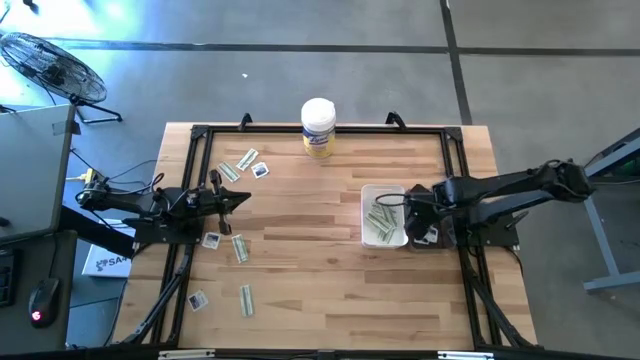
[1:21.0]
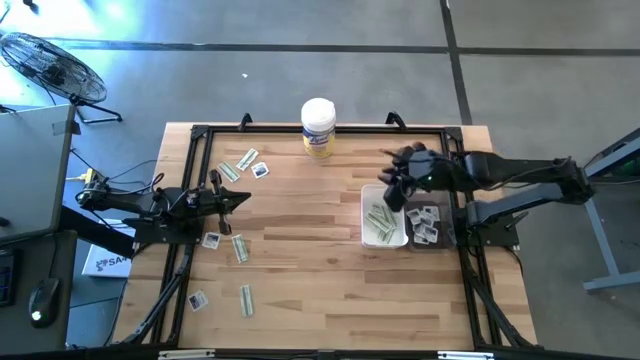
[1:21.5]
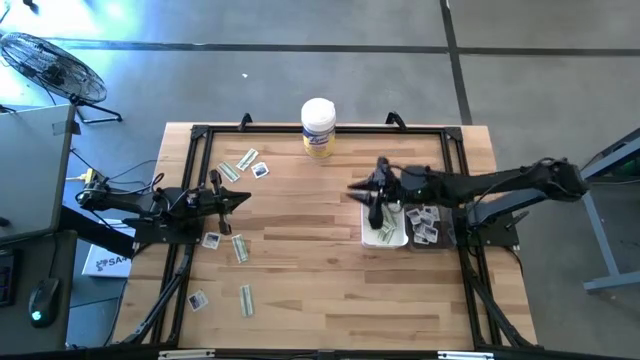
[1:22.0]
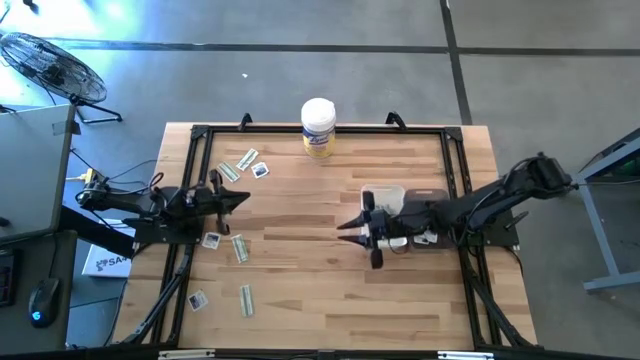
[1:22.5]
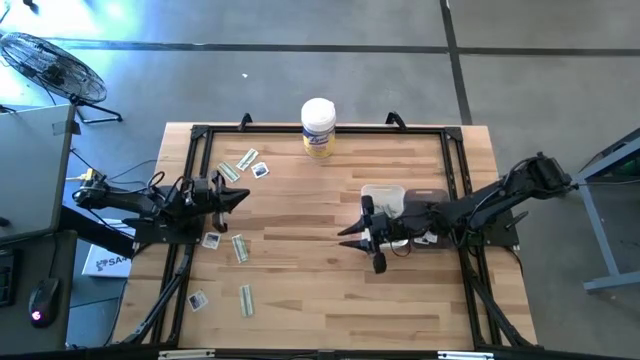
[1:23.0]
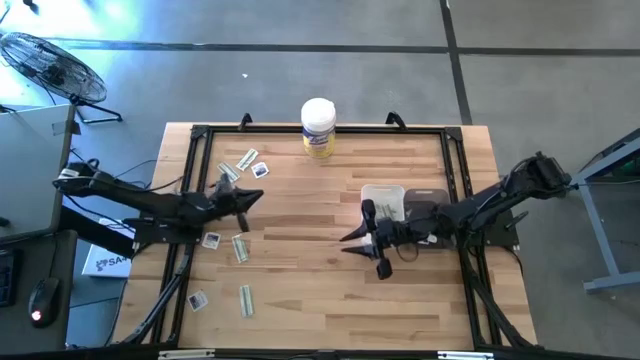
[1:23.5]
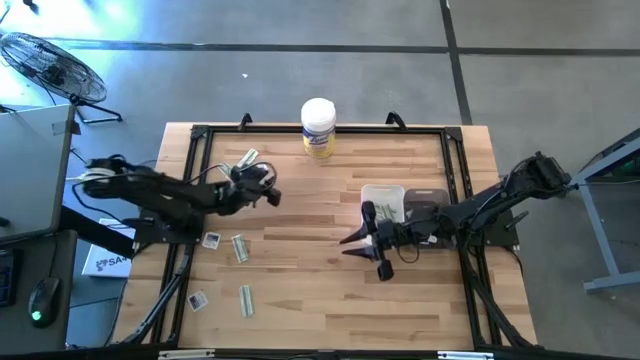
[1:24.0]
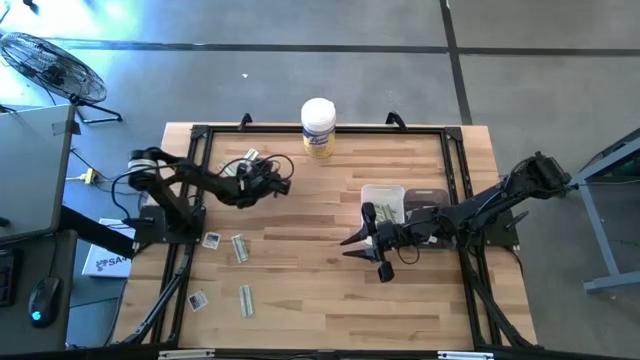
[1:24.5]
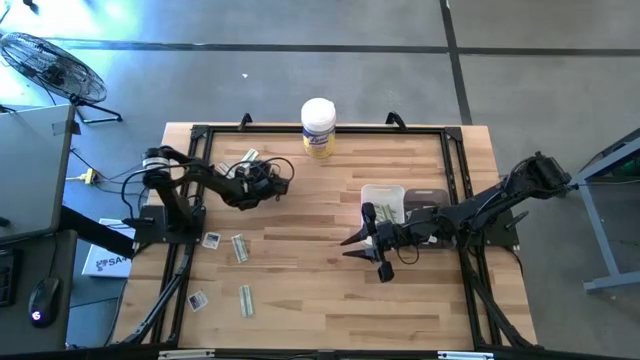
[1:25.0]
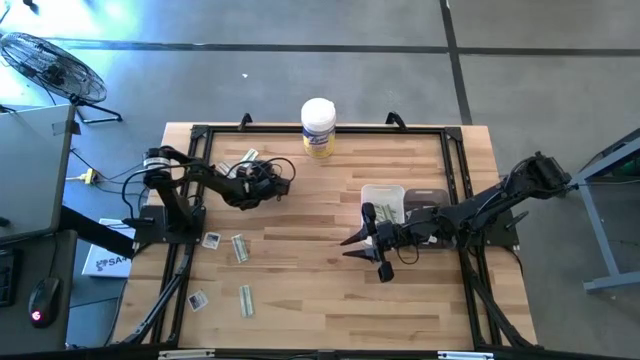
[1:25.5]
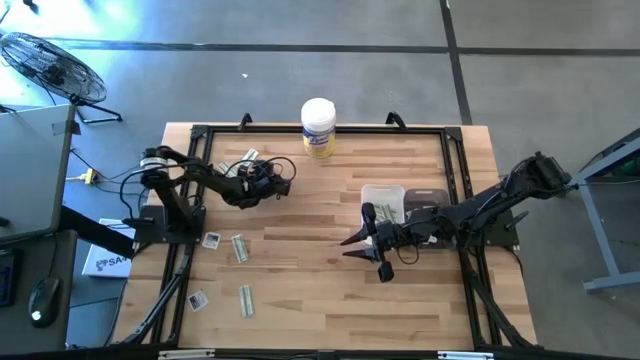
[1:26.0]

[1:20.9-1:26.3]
Task: Pick & Place First Aid Supplies
Put the blue alcohol pad into the black bin

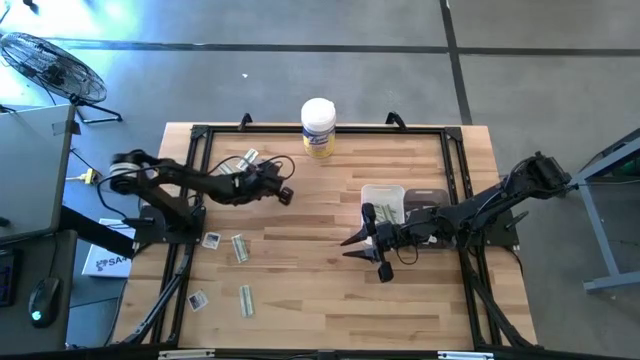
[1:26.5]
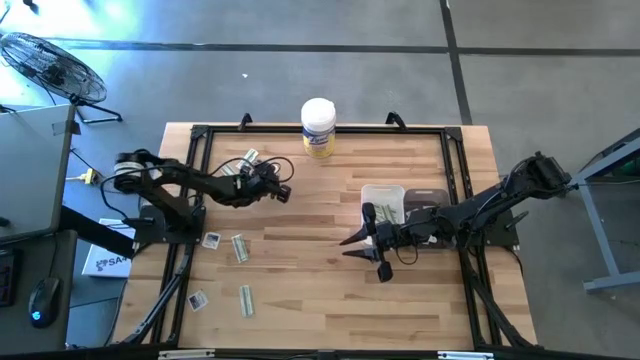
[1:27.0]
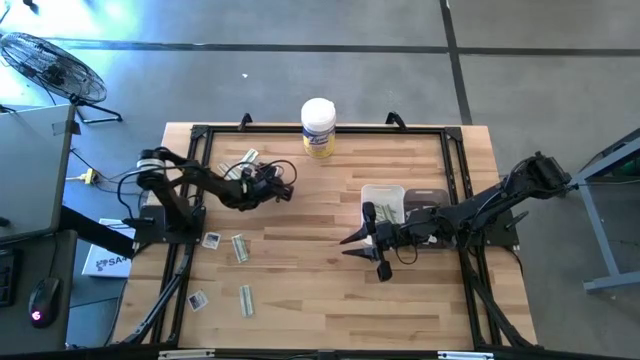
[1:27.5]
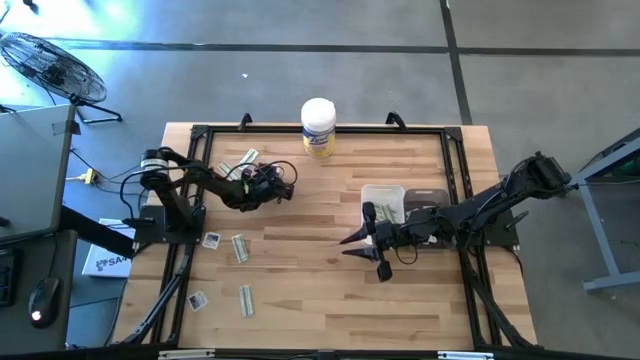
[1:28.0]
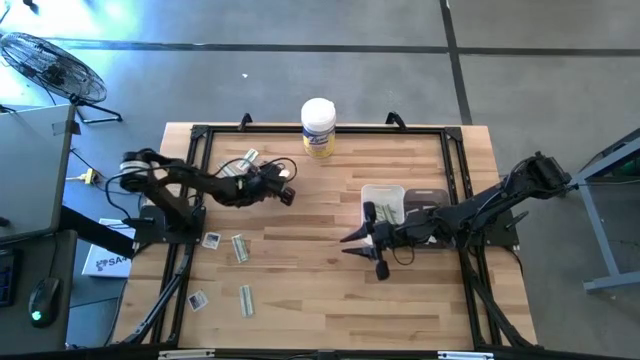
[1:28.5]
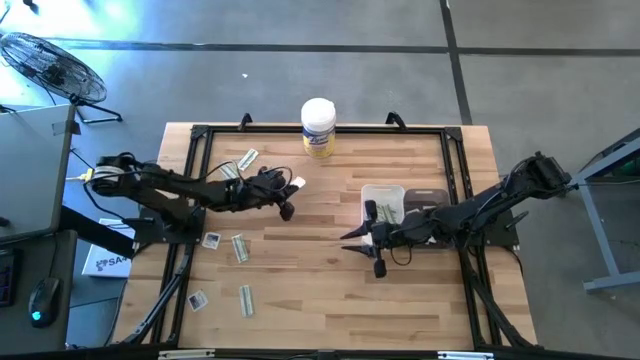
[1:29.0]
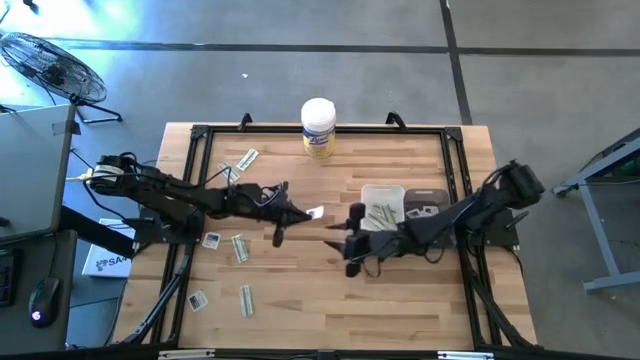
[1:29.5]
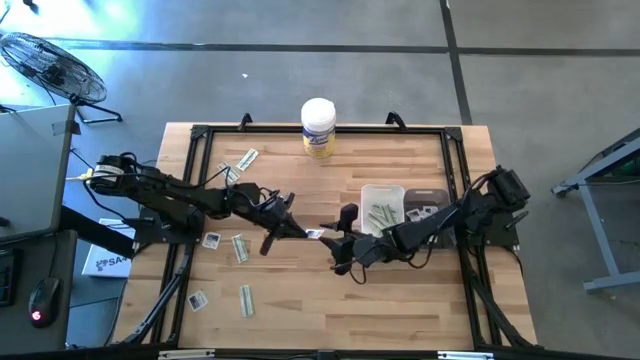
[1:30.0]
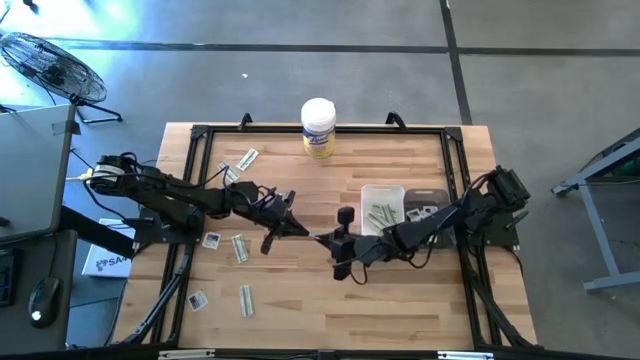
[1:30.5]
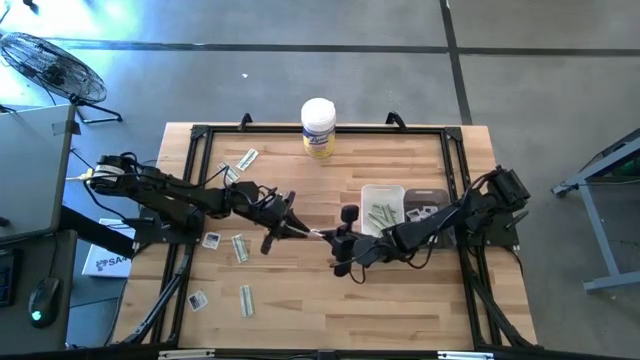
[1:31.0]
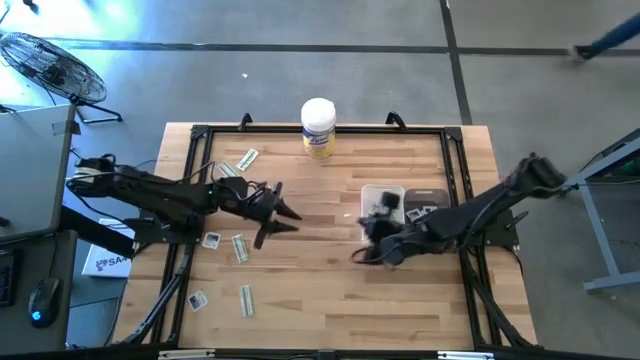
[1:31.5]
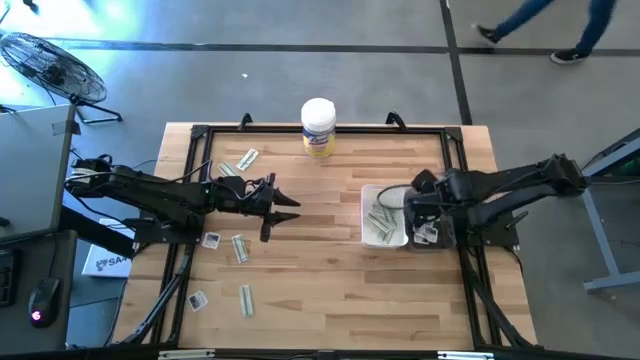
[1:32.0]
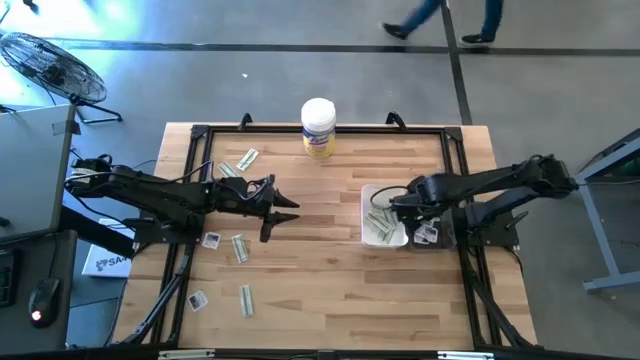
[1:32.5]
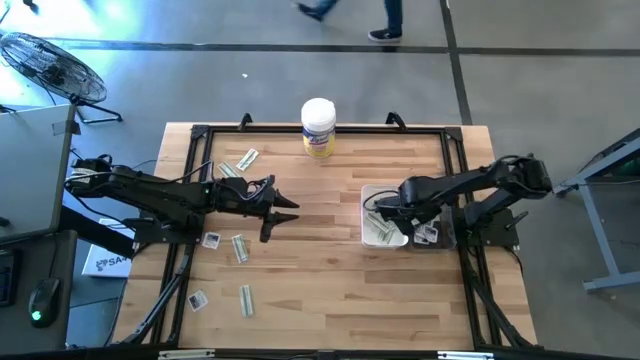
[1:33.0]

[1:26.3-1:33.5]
Put the blue alcohol pad into the black bin

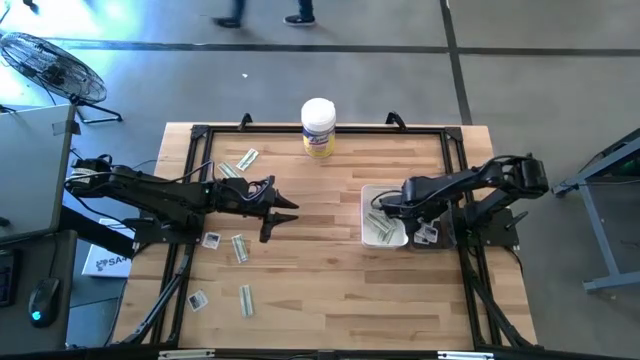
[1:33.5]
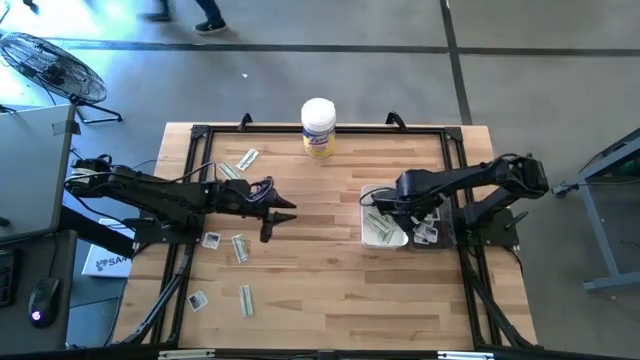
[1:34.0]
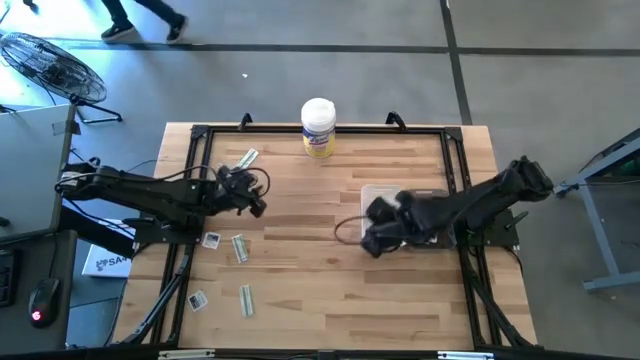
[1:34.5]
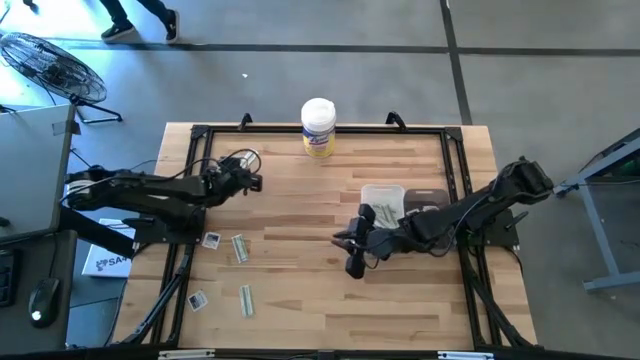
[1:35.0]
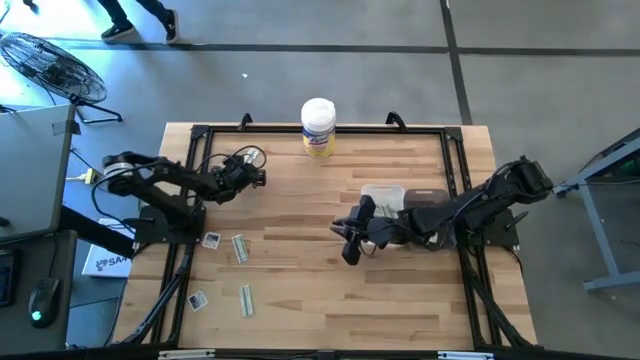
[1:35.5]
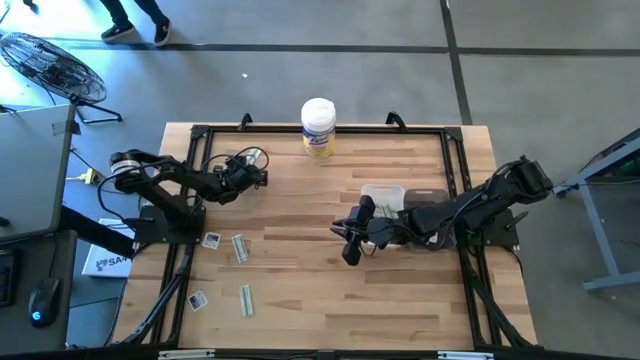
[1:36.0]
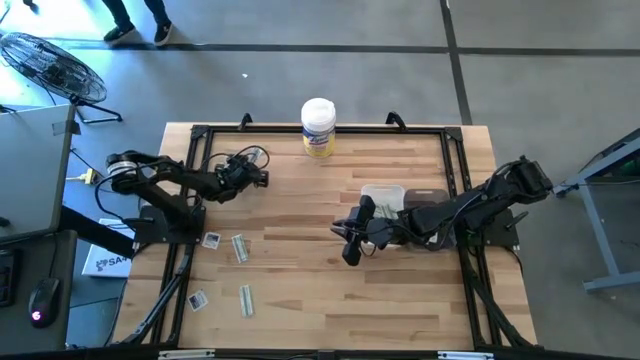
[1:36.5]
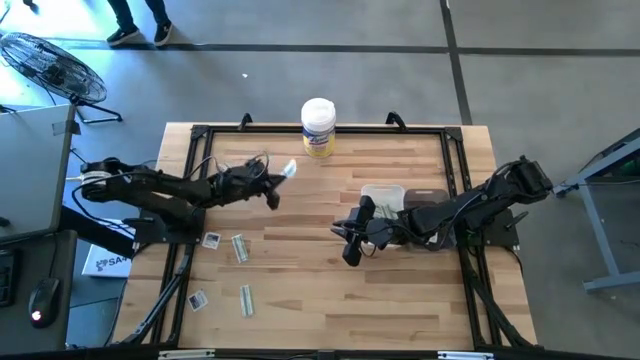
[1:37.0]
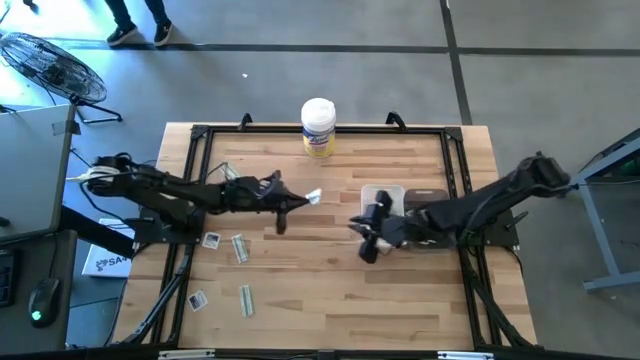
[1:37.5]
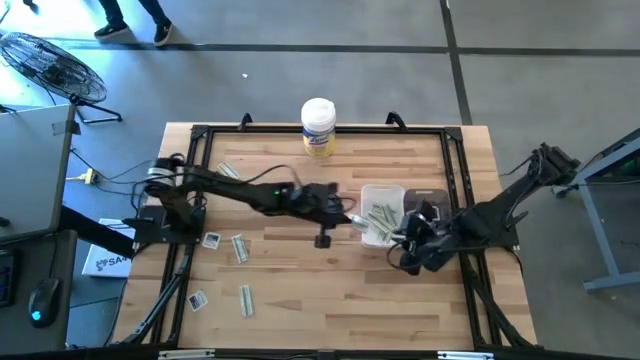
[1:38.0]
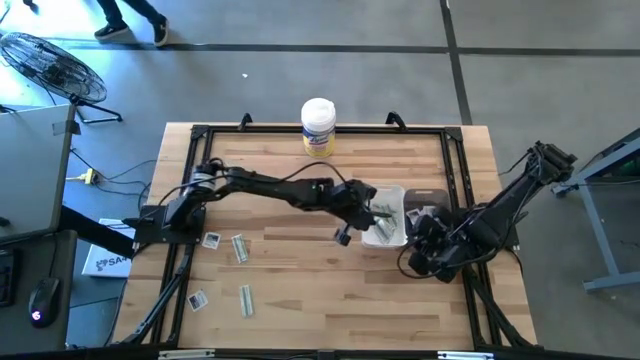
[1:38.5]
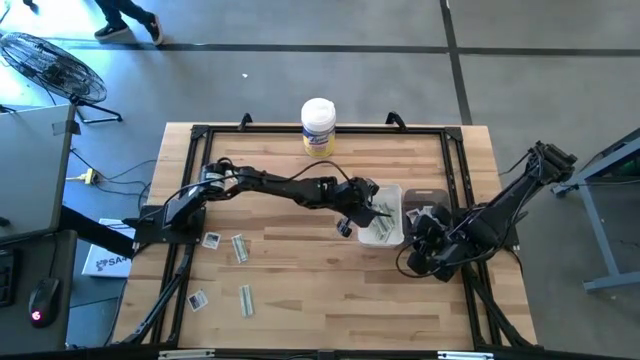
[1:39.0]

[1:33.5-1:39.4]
Put the green bandage pack into the white bin

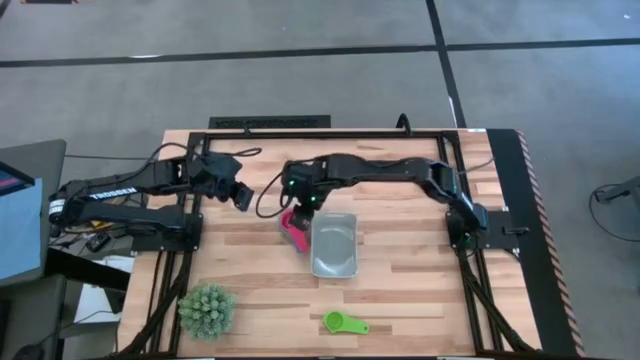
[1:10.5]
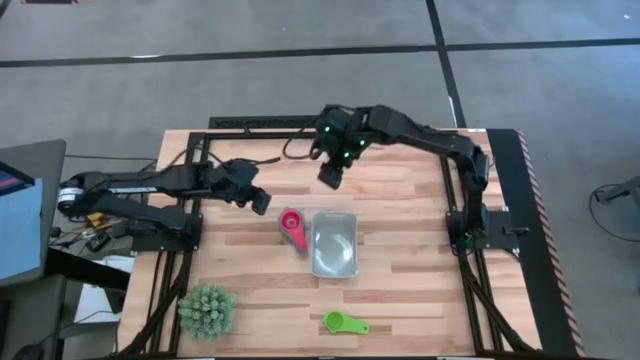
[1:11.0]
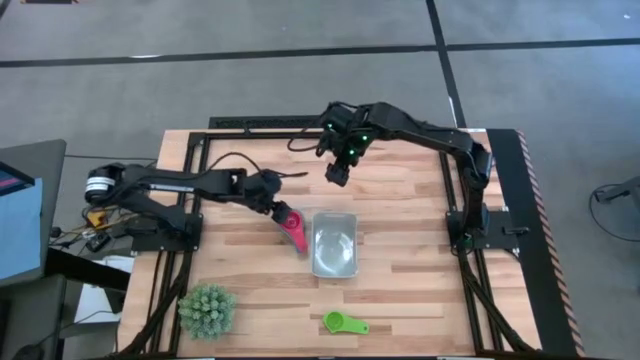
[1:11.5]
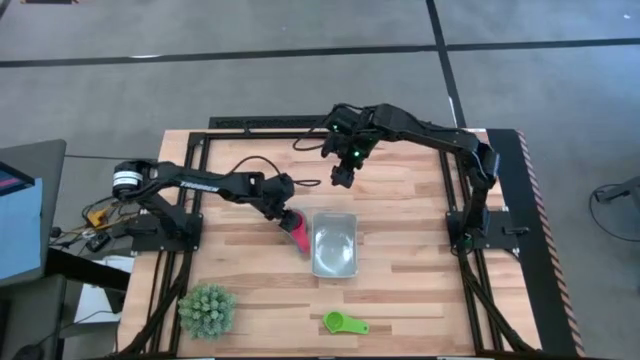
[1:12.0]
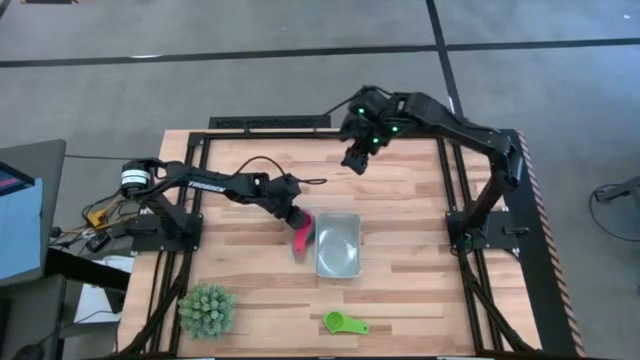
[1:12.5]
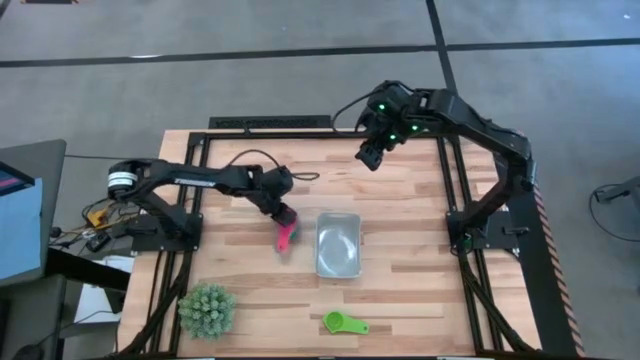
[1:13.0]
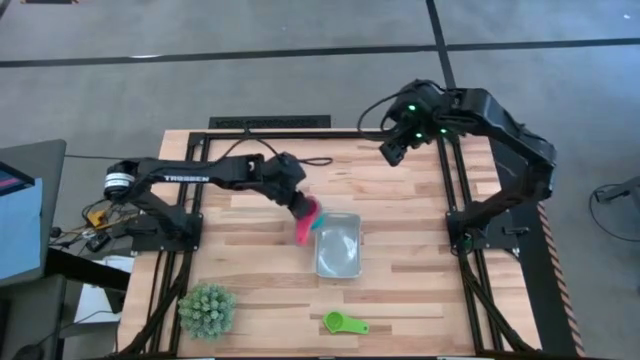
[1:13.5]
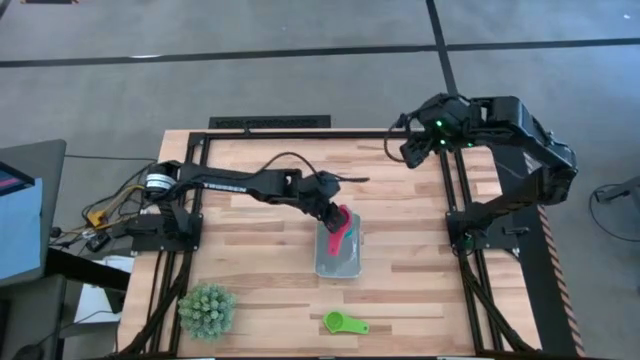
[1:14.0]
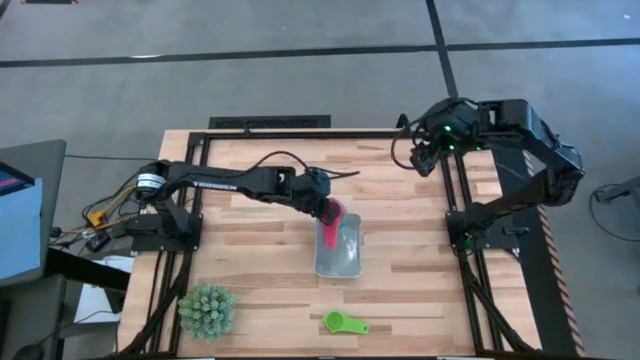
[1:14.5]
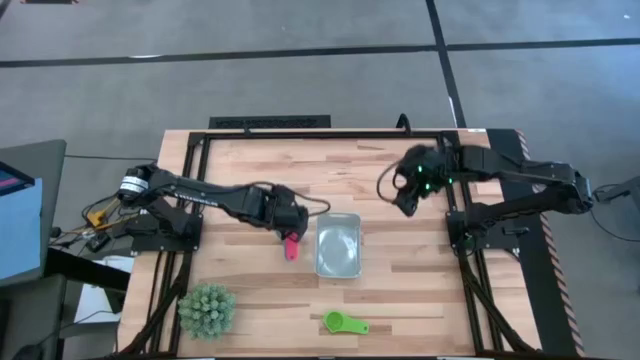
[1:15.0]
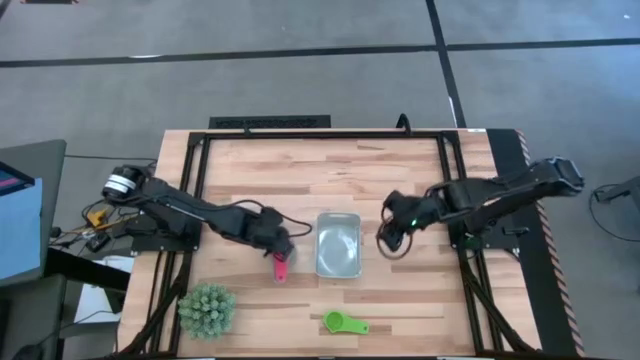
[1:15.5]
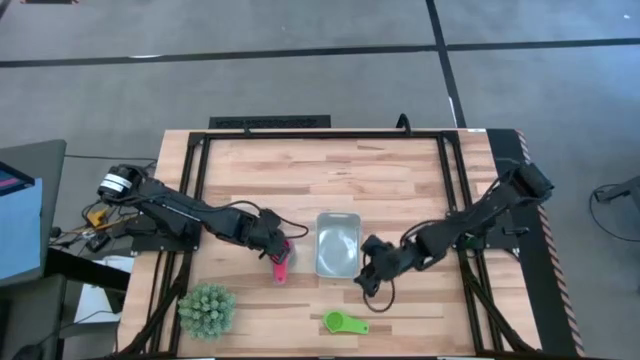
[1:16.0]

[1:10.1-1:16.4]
Task: Nest measuring cups in basket
Stack the green measuring cup on top of the red measuring cup
